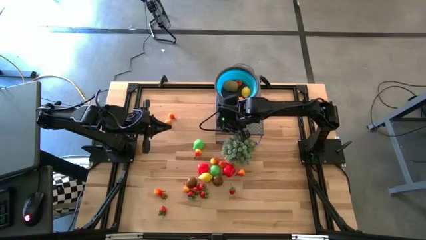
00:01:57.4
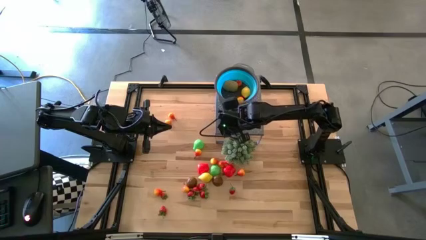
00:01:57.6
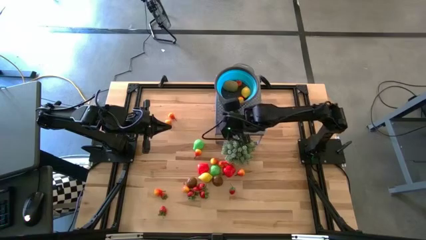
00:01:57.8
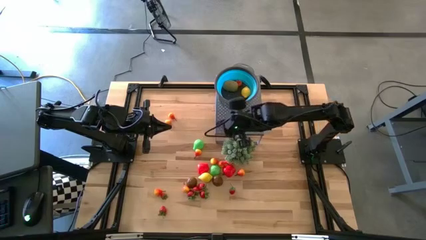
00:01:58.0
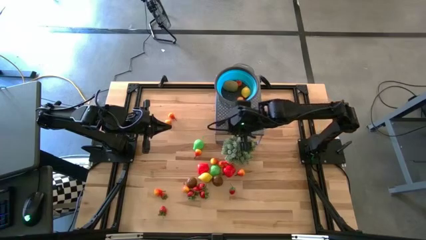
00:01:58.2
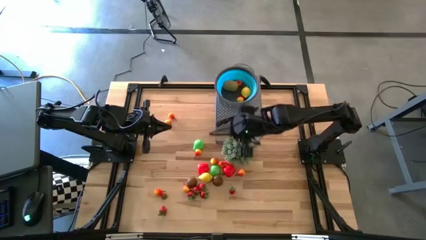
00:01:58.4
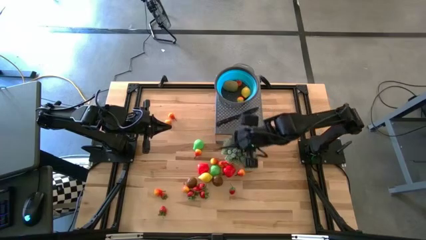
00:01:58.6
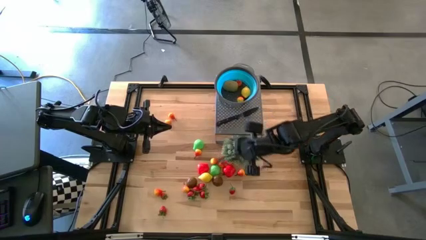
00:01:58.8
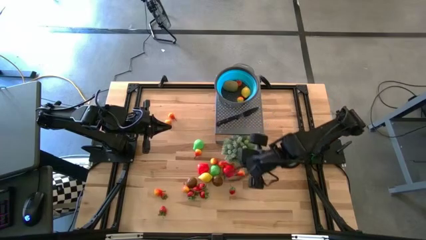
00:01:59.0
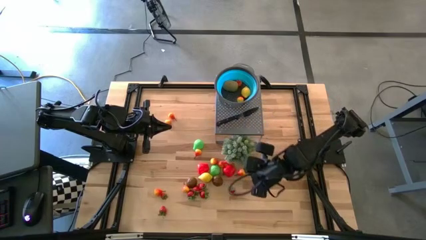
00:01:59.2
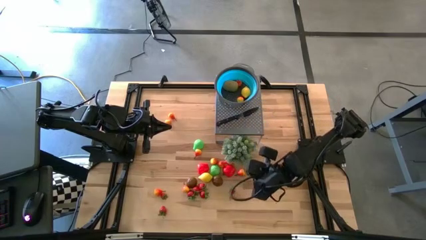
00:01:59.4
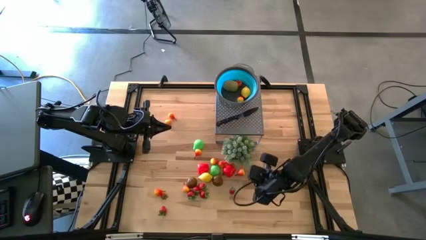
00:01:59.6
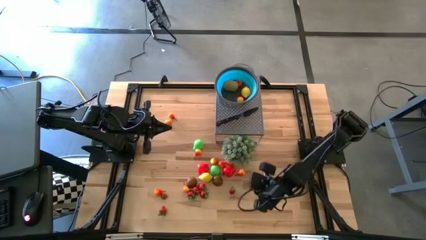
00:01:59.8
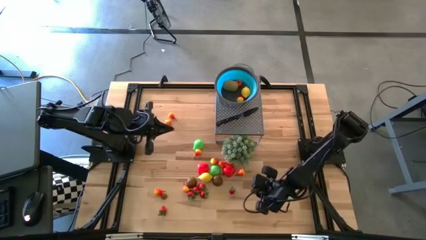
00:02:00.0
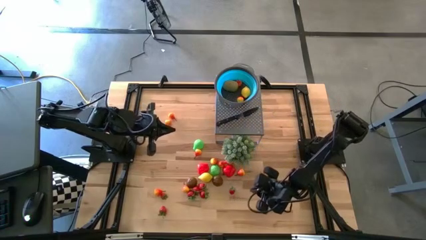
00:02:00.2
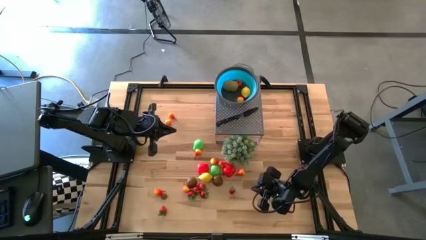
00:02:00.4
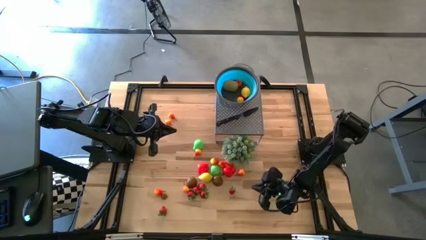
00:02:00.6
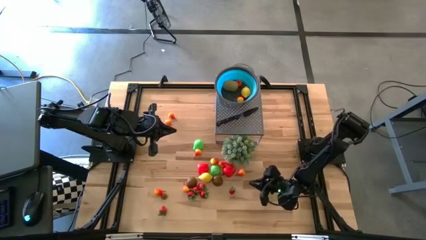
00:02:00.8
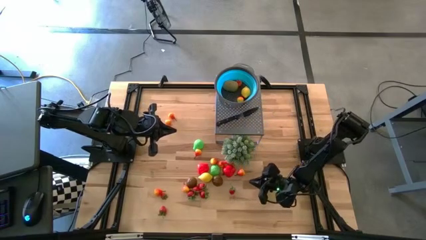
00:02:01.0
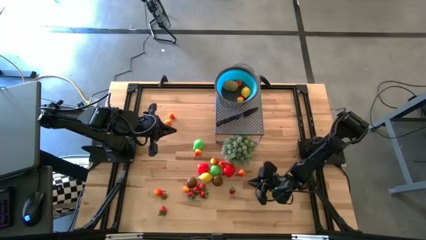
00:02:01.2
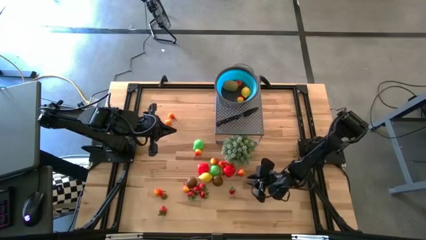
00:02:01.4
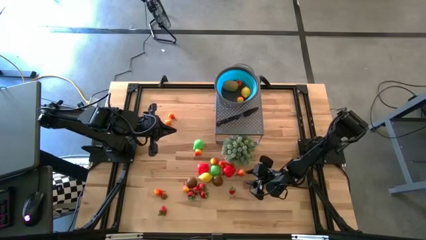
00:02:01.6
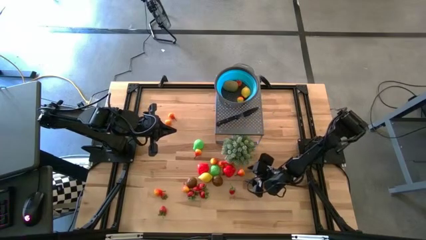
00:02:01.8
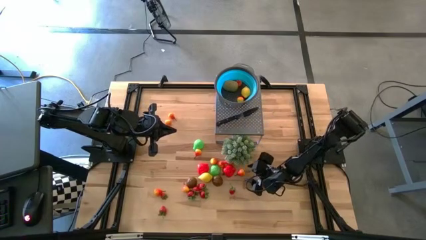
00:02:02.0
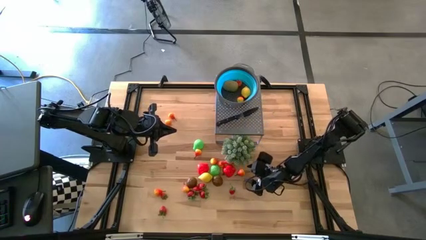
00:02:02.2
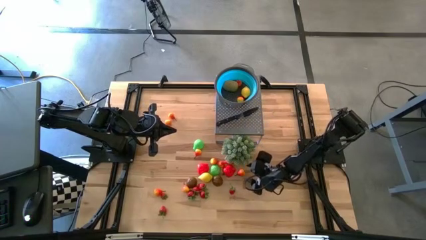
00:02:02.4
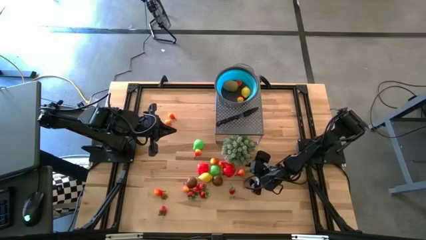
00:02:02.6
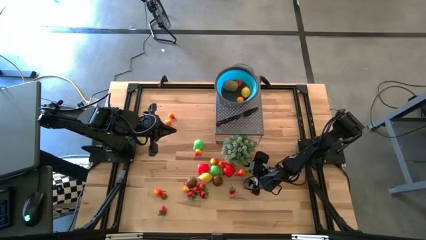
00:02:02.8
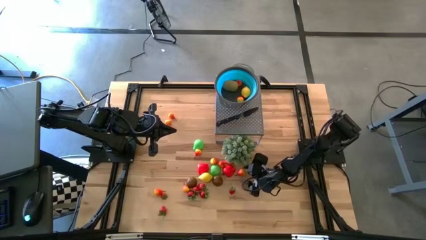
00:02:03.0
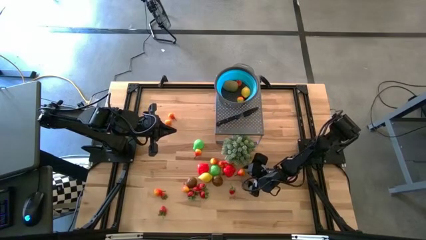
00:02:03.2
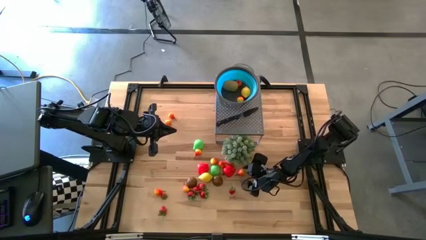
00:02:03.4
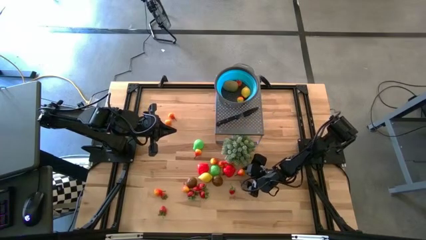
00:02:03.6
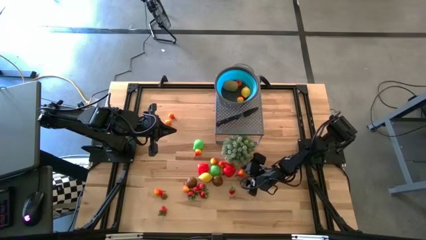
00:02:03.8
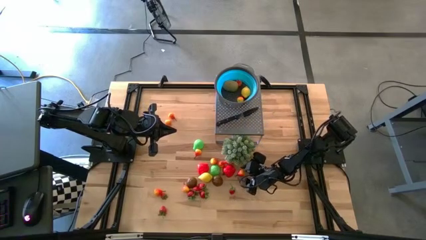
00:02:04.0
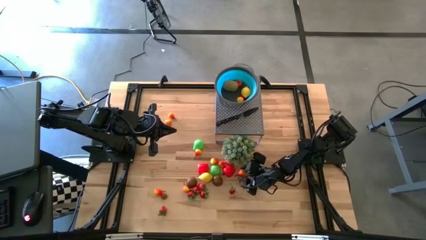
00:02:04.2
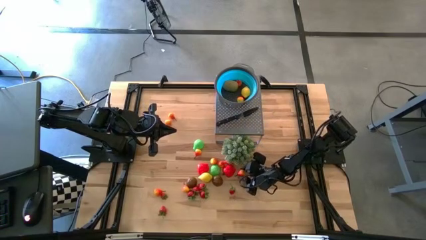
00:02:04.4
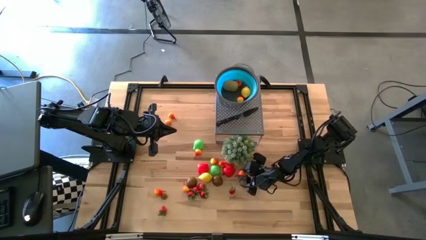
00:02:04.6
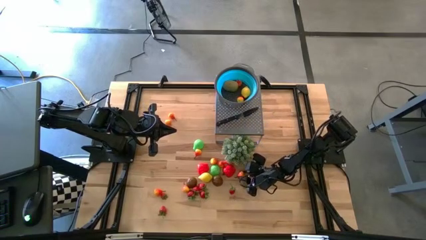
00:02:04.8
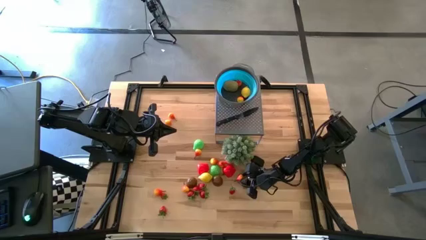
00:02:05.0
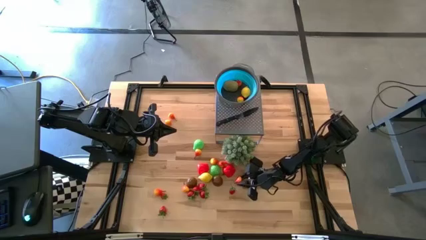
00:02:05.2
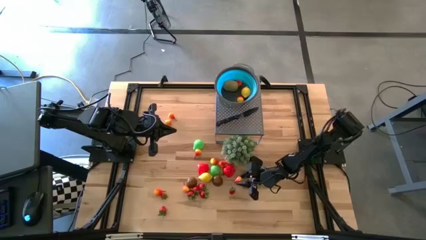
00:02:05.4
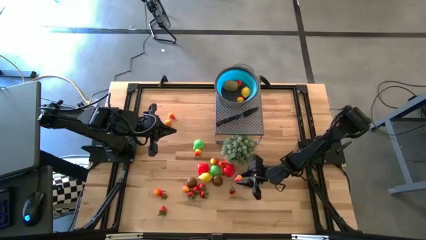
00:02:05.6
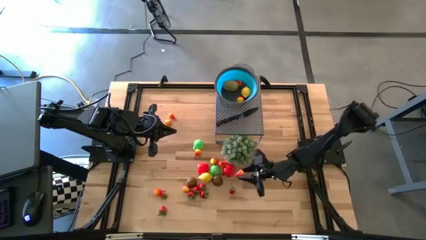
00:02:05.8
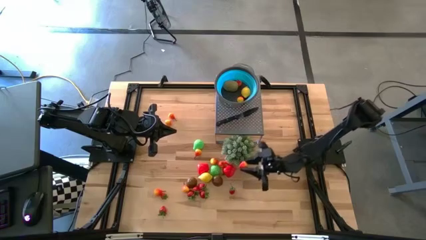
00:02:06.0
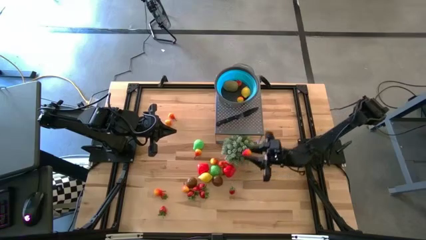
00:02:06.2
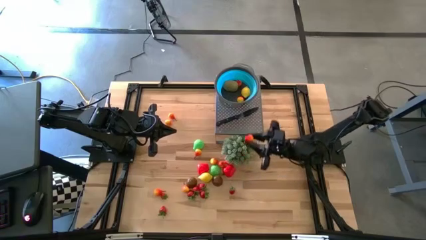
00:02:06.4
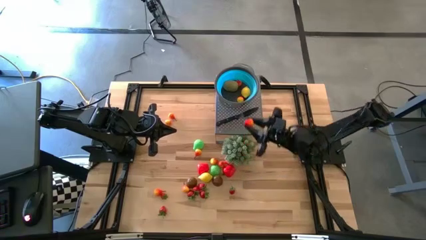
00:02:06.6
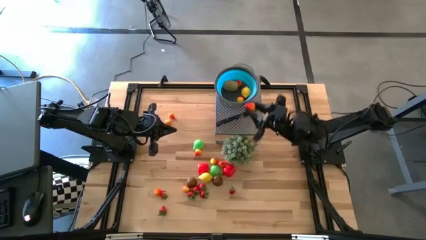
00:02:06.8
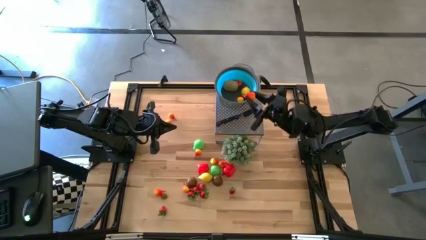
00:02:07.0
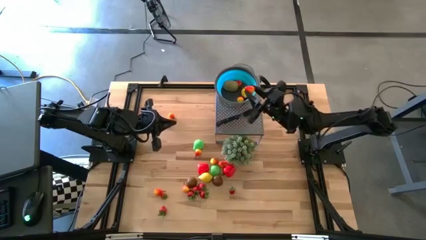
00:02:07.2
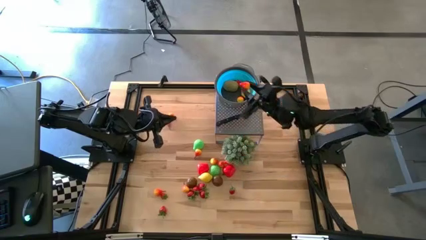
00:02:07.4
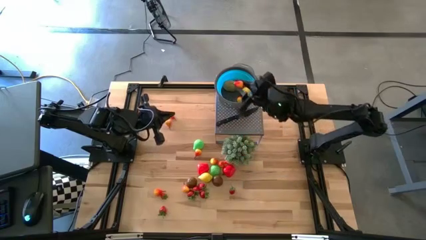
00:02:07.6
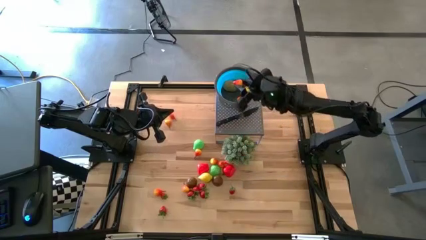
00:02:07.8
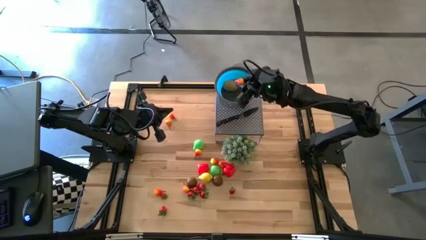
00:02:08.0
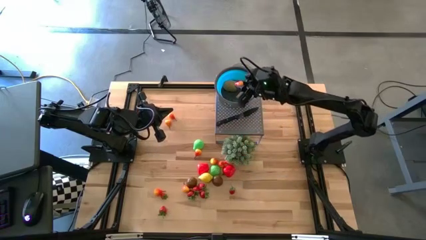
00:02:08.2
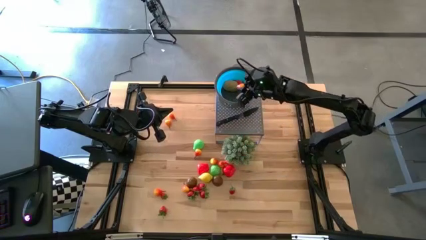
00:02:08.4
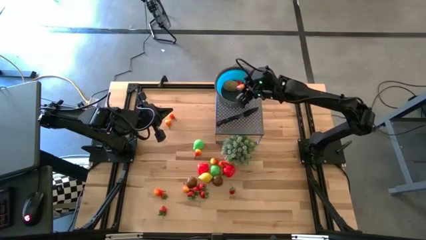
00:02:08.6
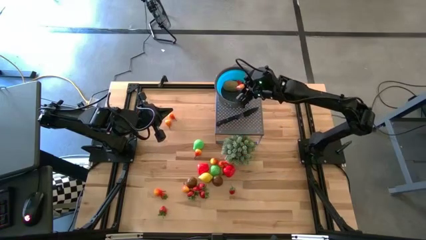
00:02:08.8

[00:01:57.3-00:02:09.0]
Task: Pick & Place Fruit
Put the orange pear into the blue strainer bowl

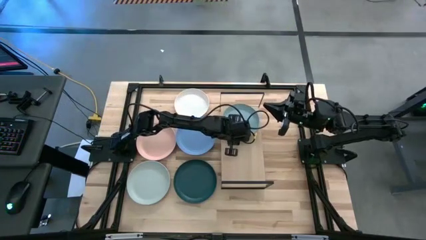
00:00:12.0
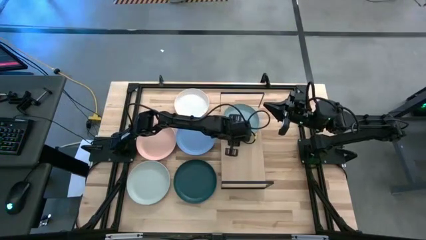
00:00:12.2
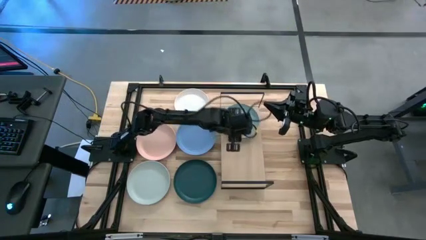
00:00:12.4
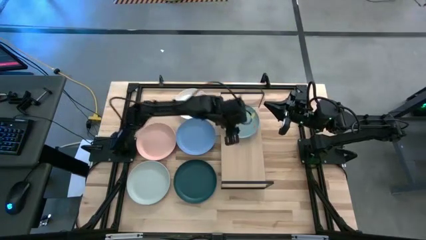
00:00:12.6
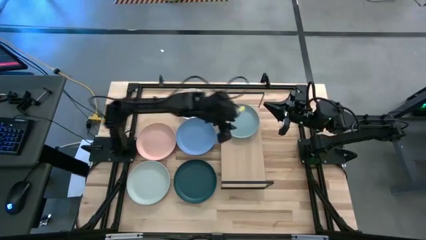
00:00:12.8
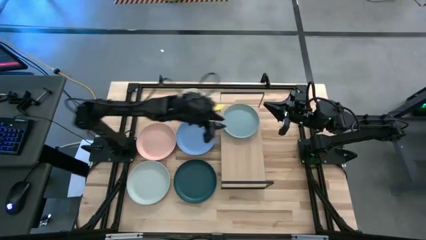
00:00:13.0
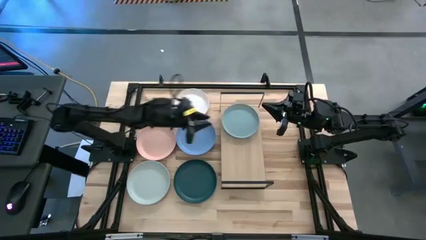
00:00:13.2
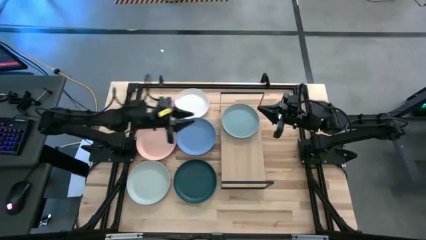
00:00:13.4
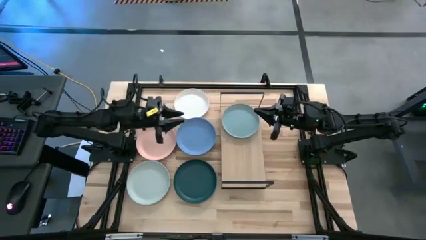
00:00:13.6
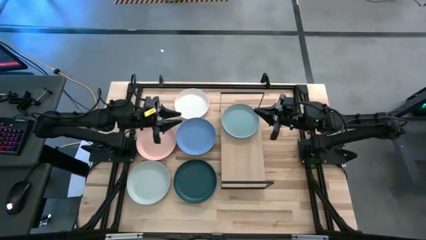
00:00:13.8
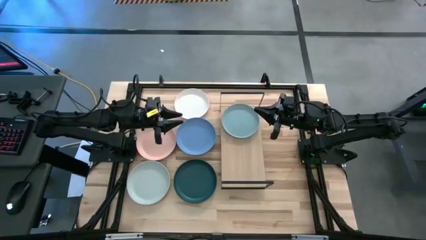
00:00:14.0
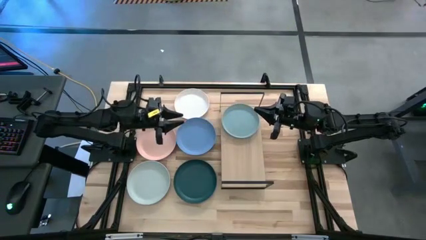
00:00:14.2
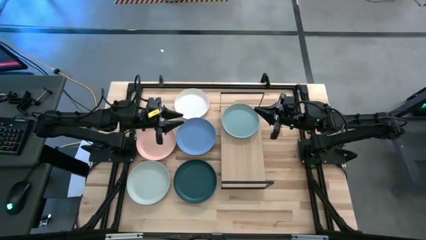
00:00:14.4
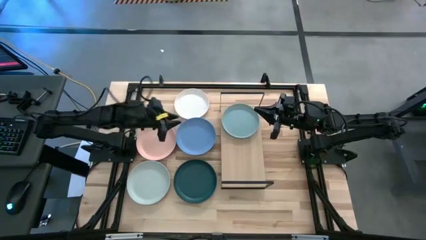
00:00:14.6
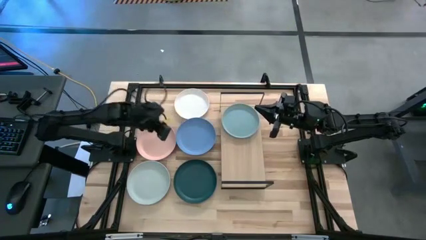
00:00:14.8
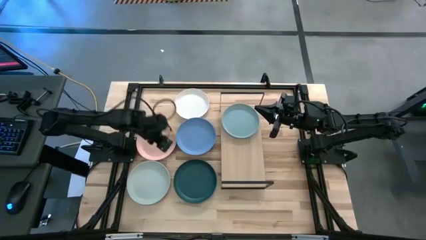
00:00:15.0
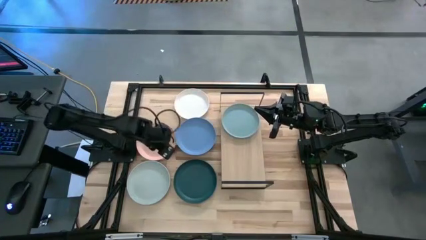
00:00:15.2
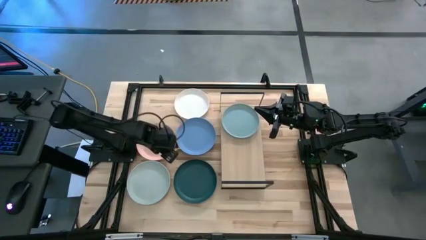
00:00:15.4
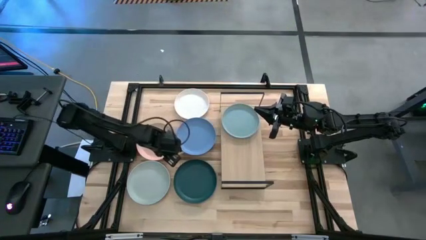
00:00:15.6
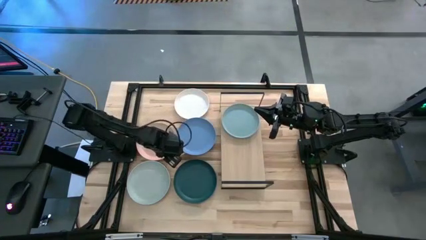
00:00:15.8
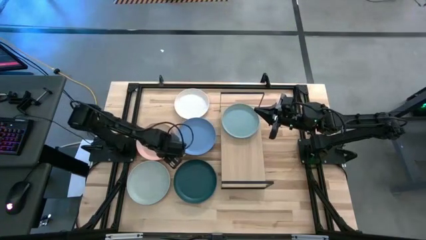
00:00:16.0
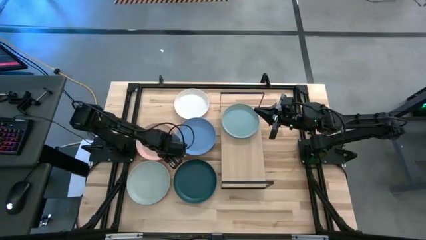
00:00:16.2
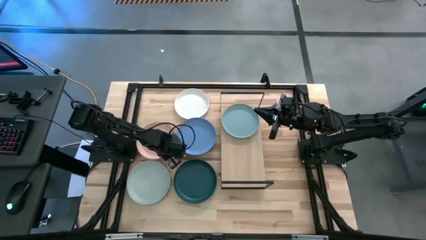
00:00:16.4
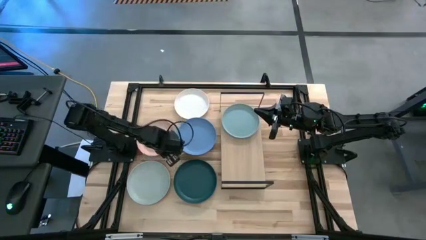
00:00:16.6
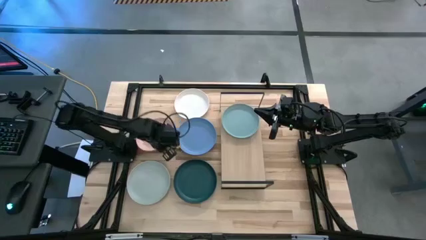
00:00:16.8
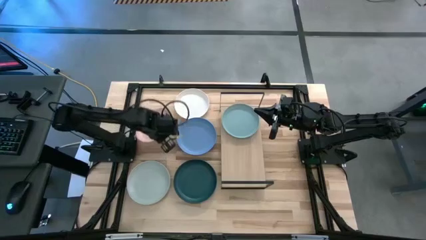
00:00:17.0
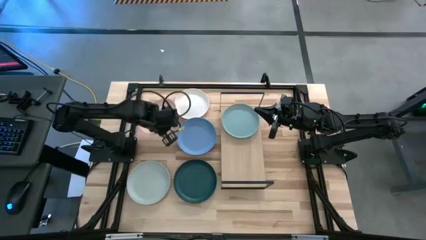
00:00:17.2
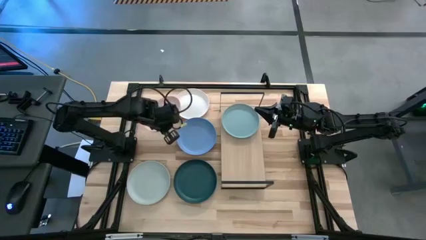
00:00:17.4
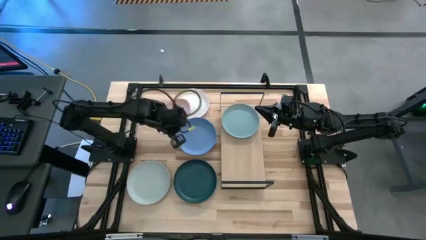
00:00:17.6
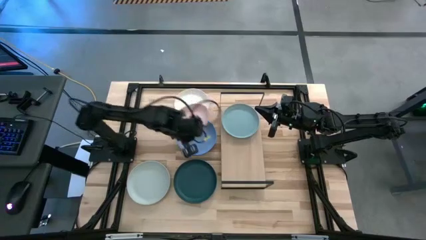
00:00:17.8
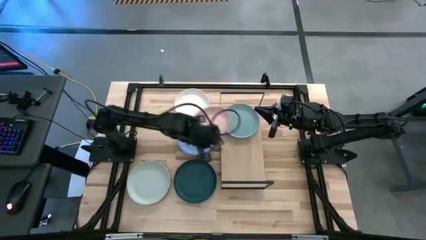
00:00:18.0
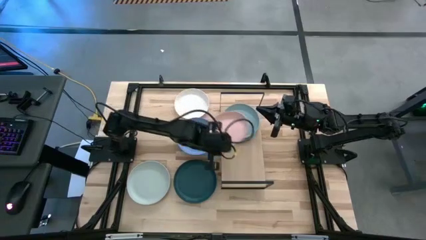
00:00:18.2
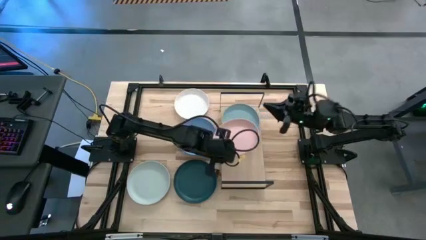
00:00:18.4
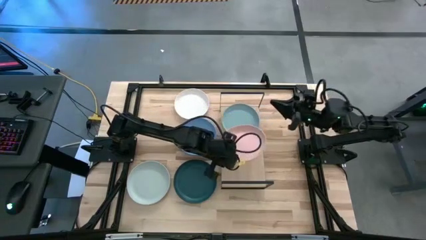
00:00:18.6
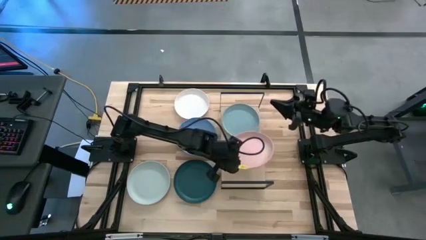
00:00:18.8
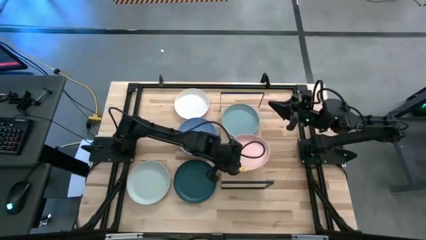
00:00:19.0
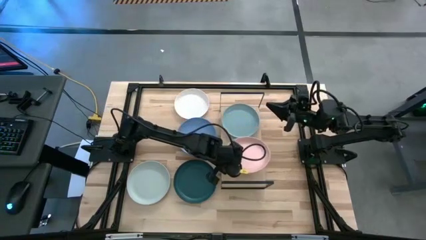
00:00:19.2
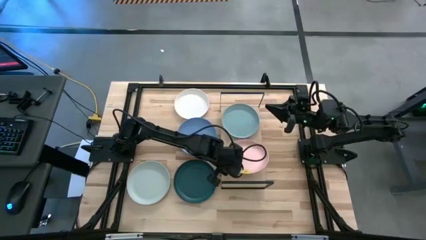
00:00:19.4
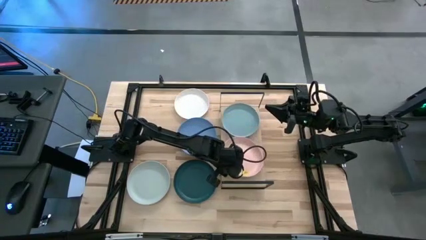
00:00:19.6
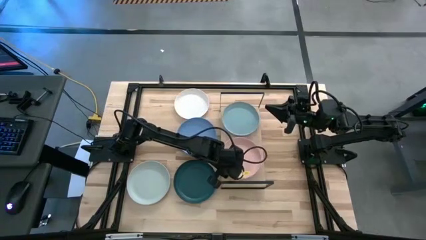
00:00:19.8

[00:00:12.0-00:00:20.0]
Task: Place and stack plates onto a shelf
Put the light orange plate on the shelf
